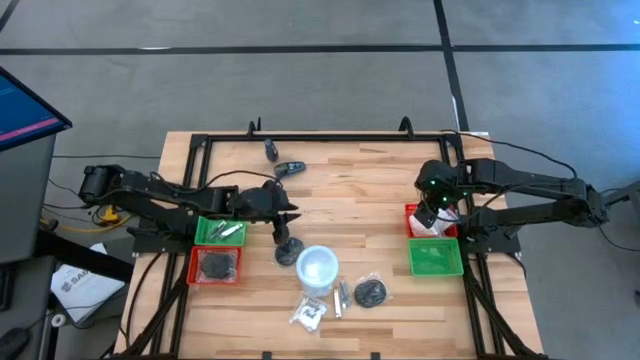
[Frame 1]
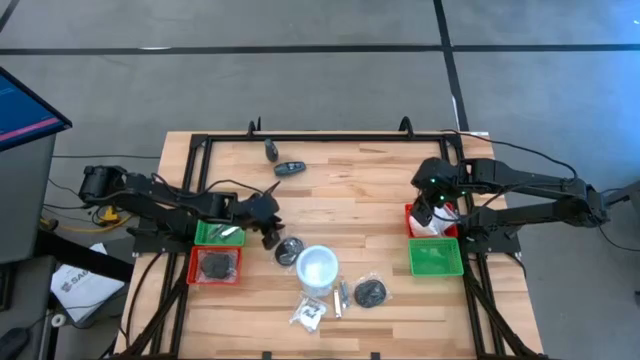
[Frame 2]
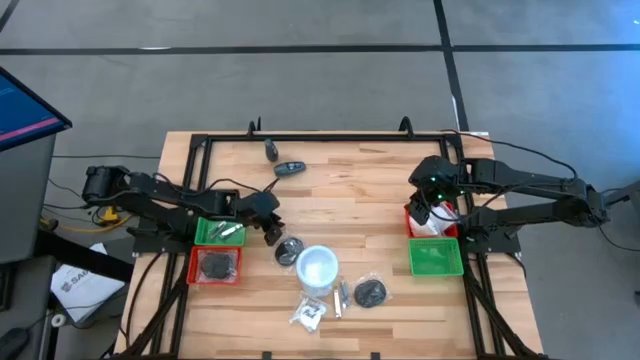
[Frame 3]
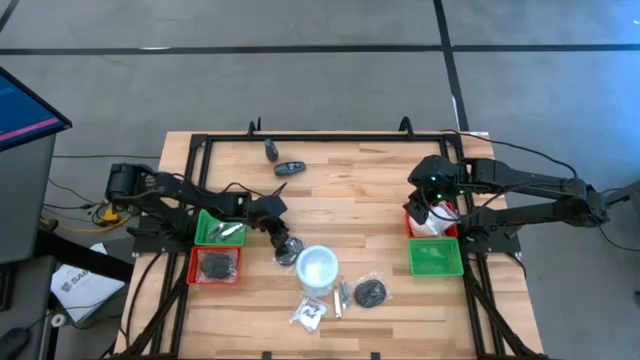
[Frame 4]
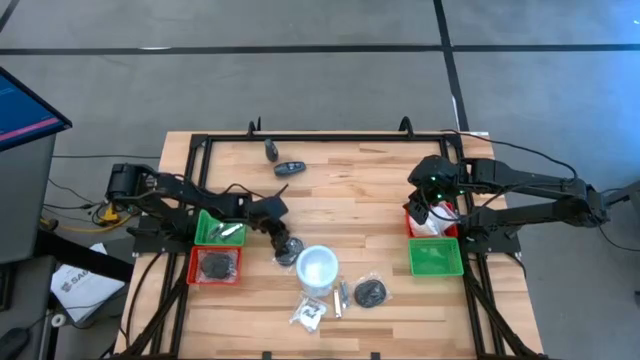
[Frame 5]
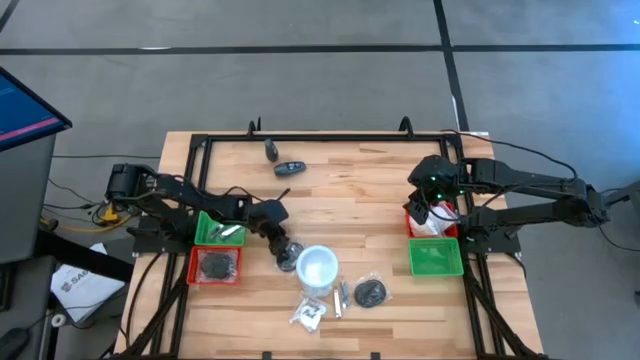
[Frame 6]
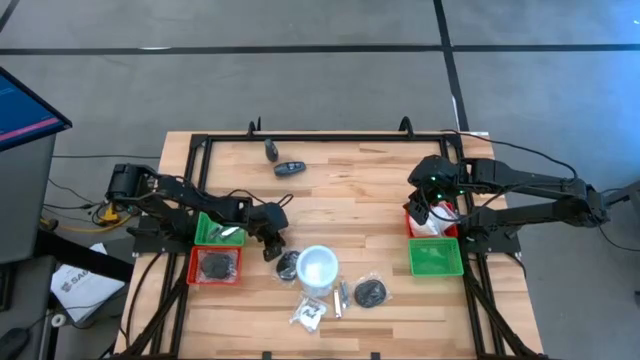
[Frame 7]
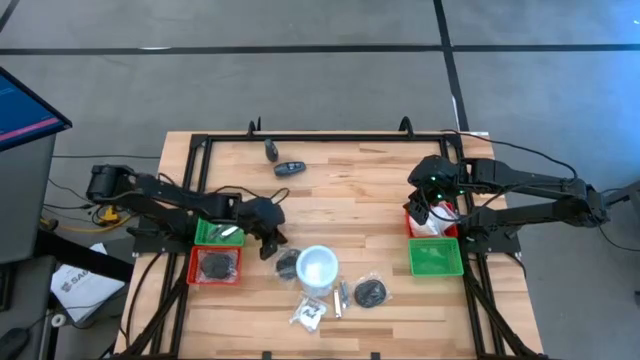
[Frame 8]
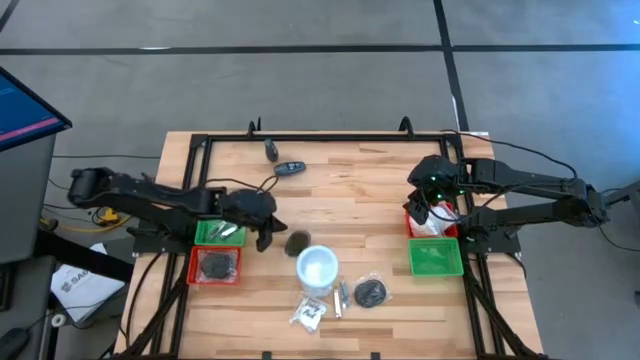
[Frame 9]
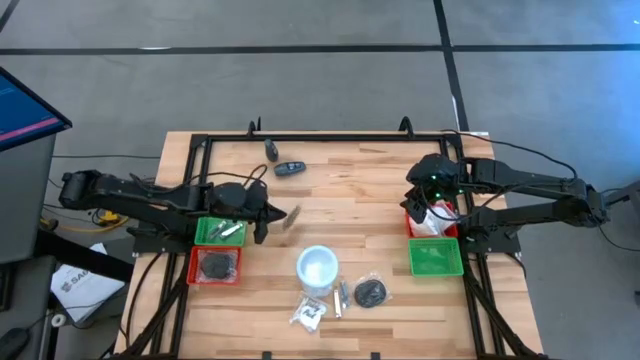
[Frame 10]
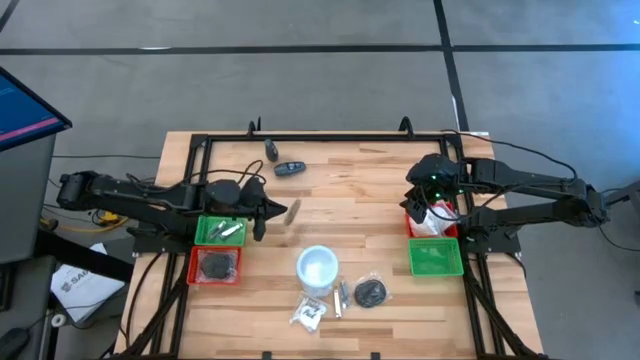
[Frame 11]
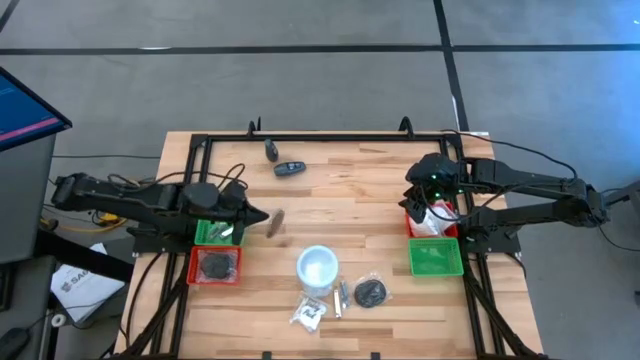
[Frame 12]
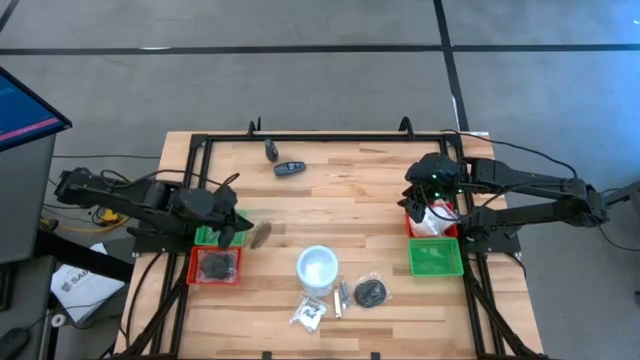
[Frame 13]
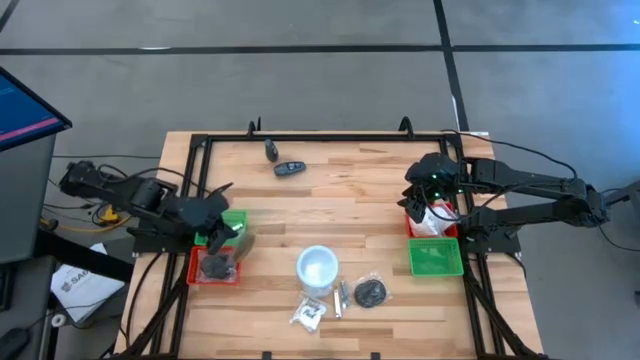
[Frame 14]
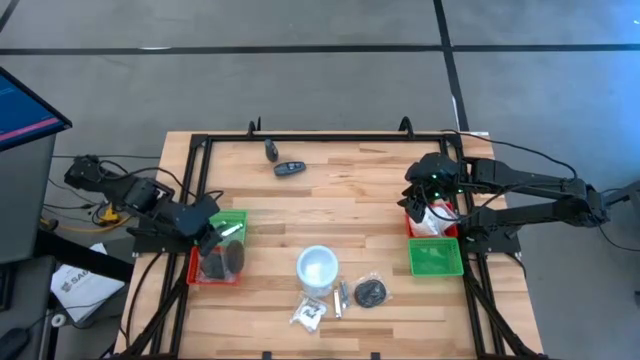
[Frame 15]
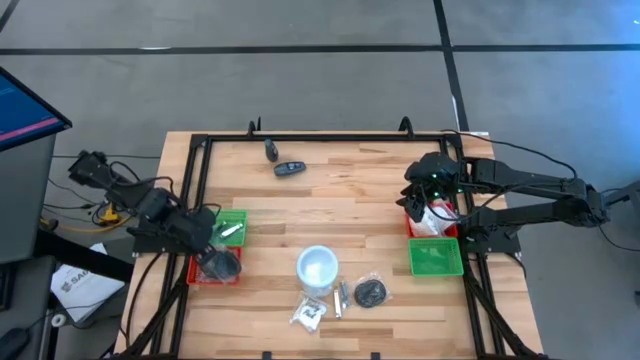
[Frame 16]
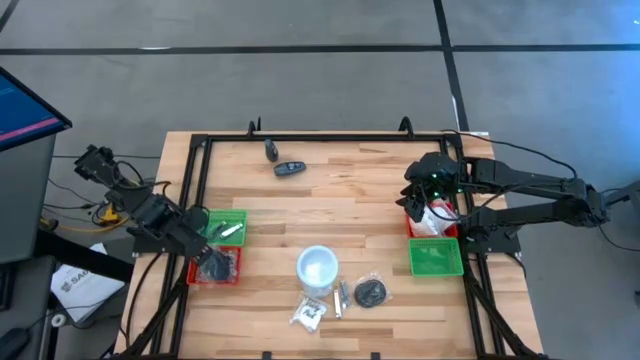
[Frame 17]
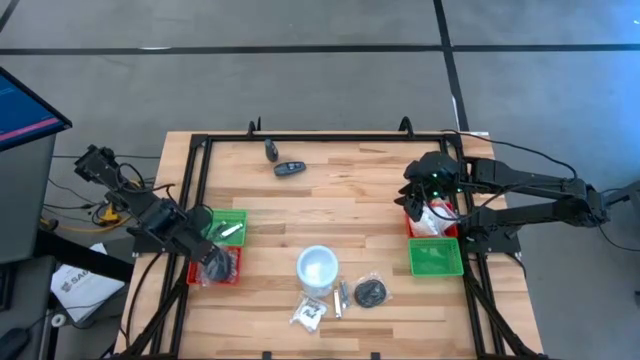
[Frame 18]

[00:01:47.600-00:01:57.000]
Task: Pick & Place Travel size toiletries
Put the black hairbrush into the left red bin

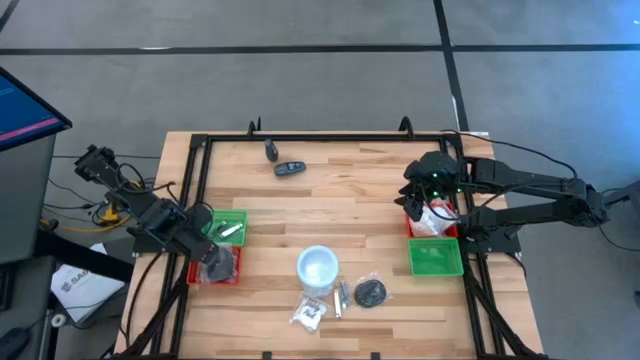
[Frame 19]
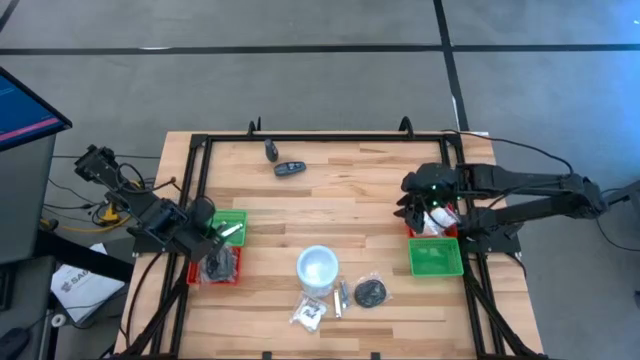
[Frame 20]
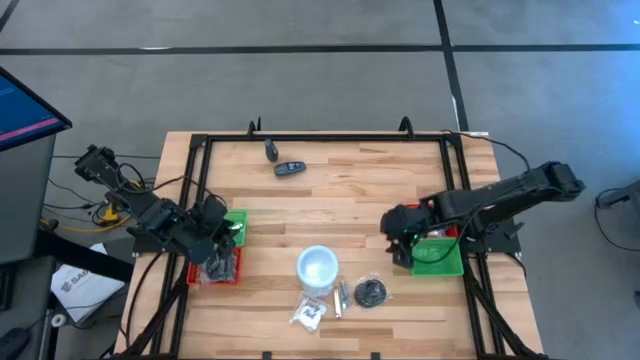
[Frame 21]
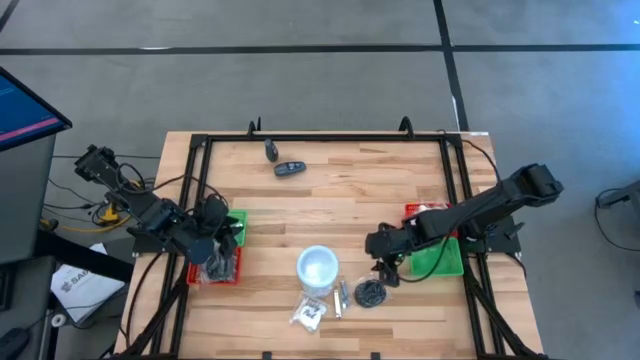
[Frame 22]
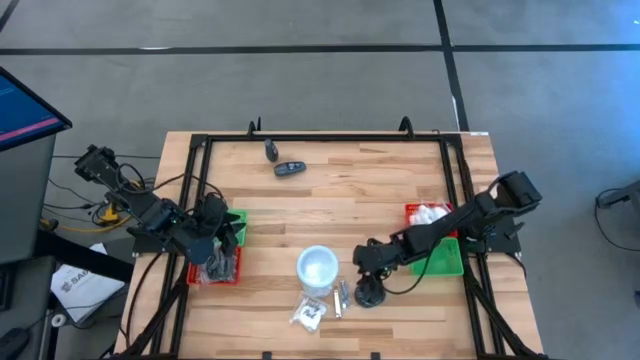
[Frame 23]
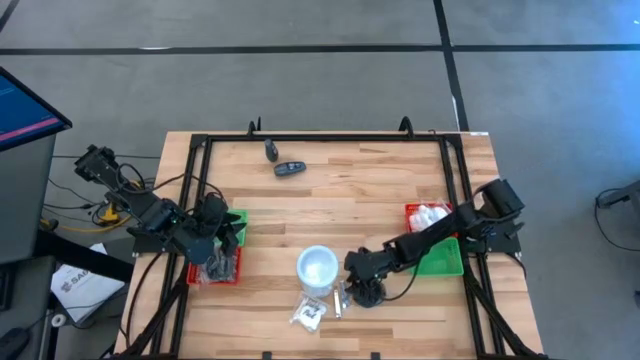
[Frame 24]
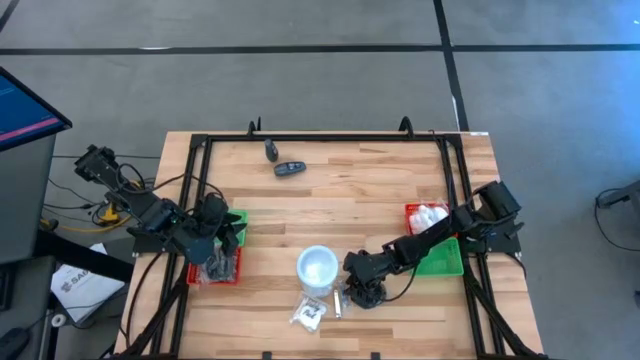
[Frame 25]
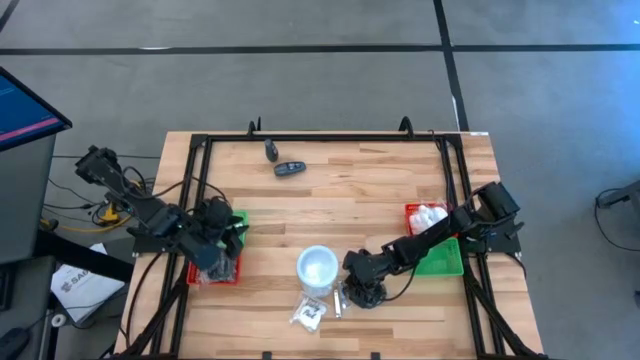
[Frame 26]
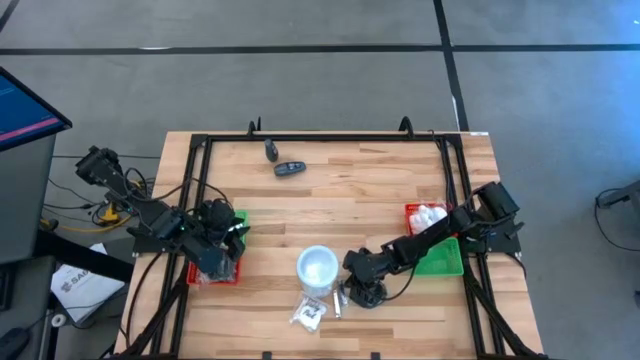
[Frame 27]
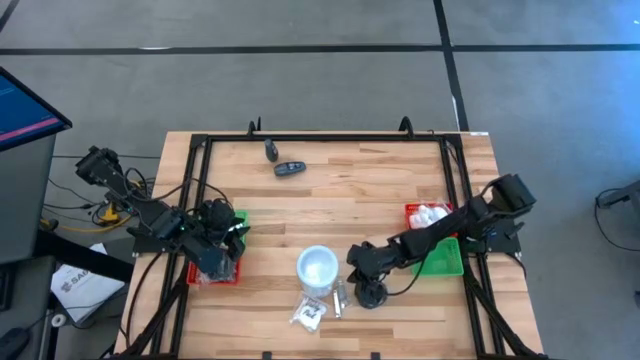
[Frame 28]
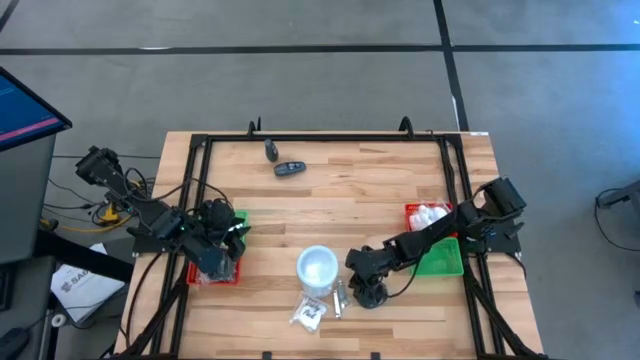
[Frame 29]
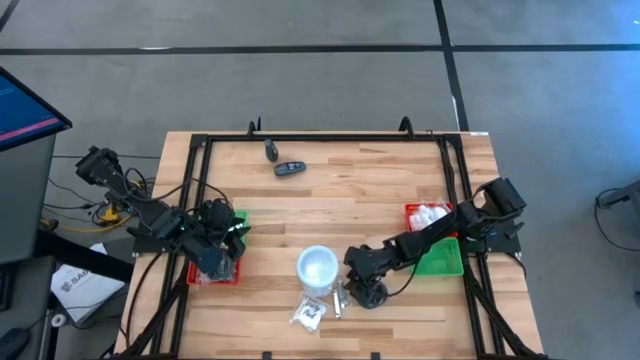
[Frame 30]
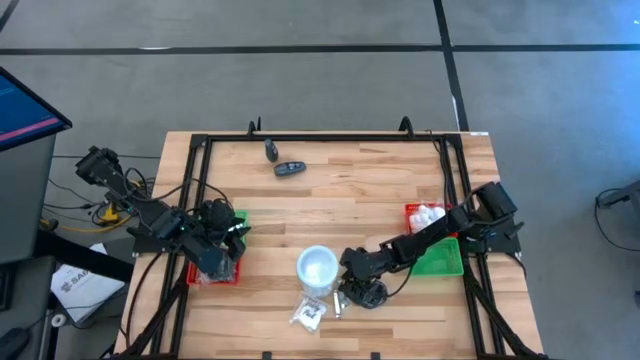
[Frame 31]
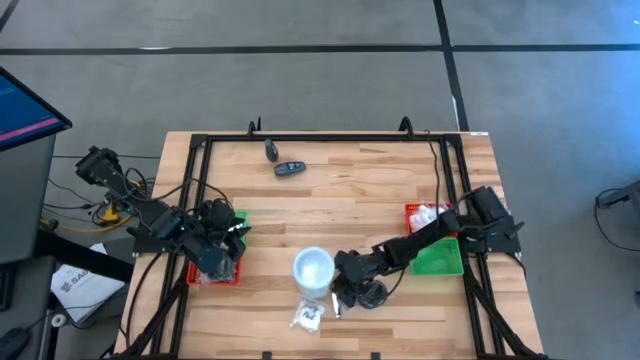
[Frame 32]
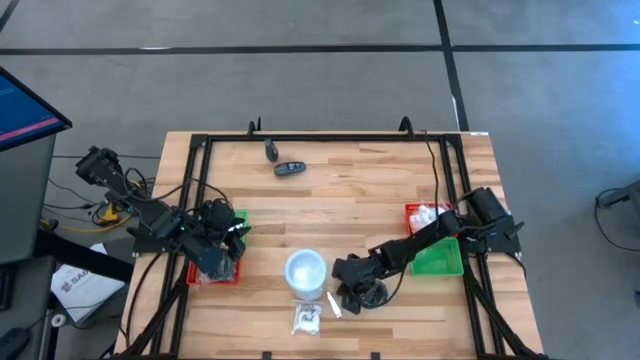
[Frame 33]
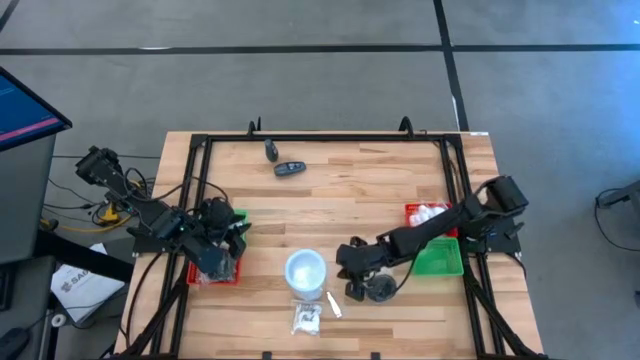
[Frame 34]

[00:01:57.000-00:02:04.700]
Put the silver nail cutter into the left green bin

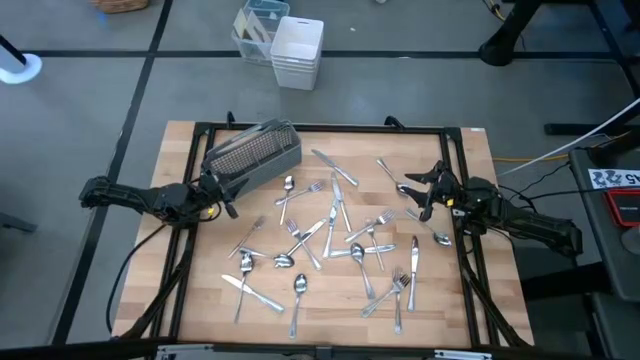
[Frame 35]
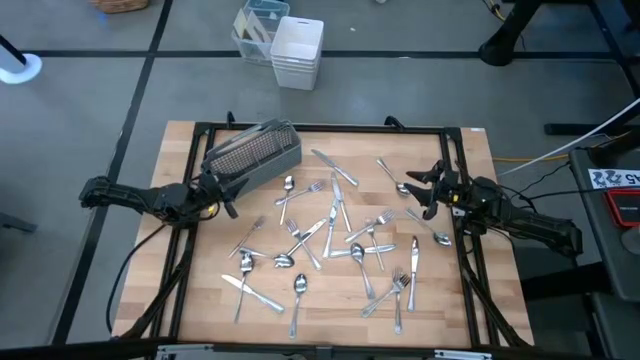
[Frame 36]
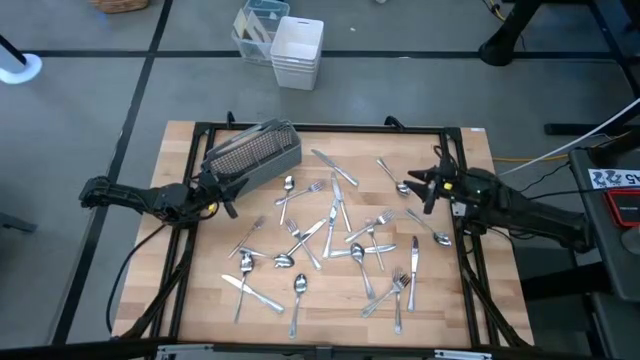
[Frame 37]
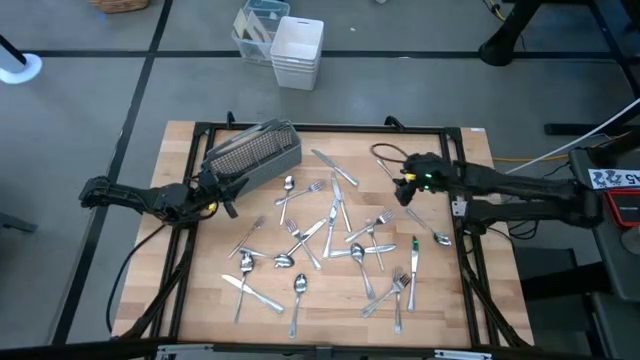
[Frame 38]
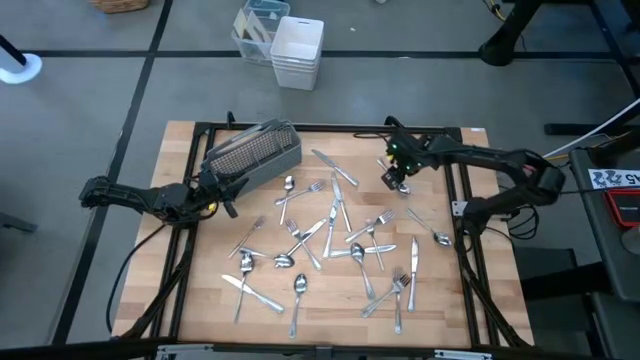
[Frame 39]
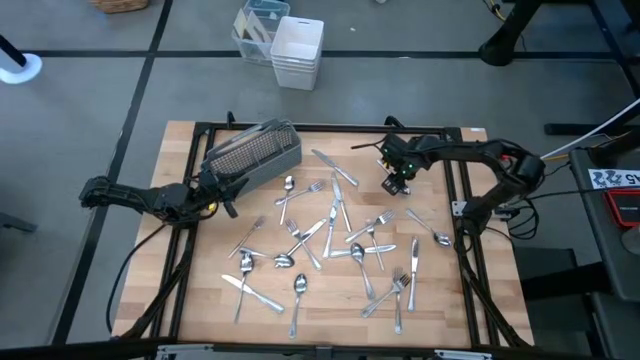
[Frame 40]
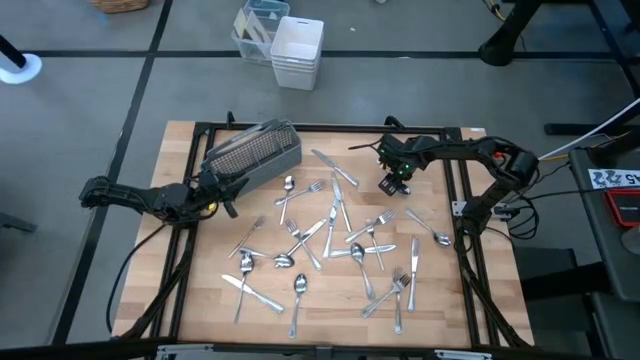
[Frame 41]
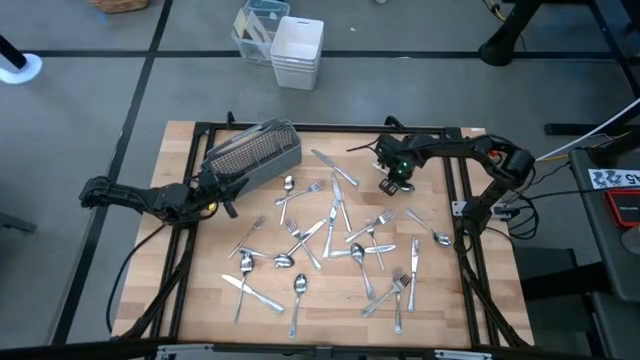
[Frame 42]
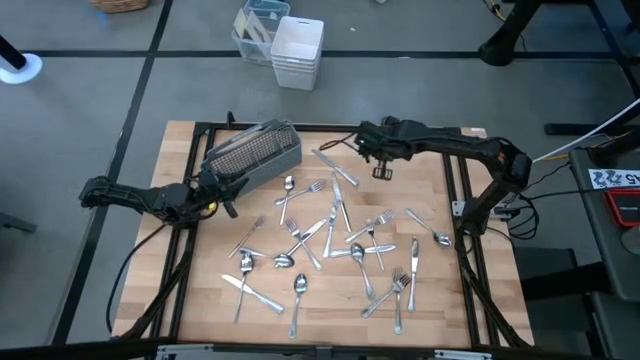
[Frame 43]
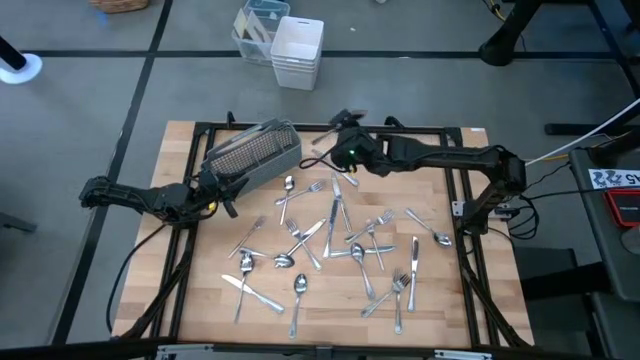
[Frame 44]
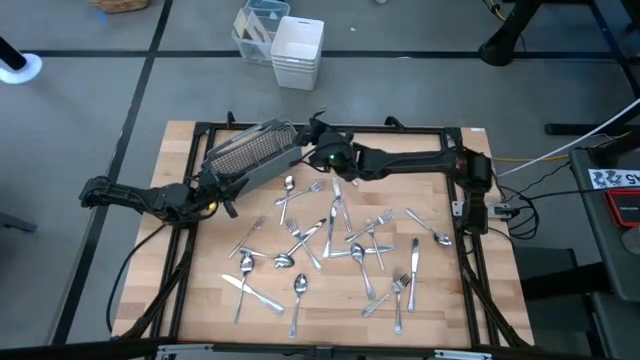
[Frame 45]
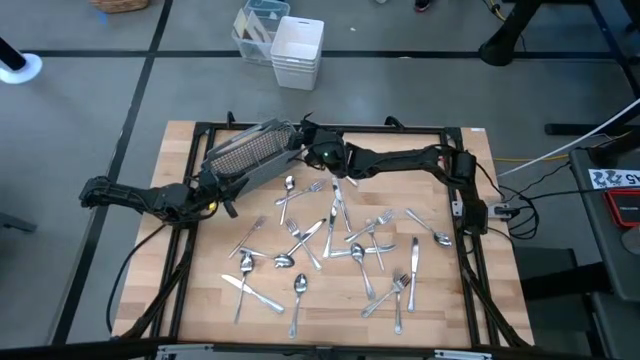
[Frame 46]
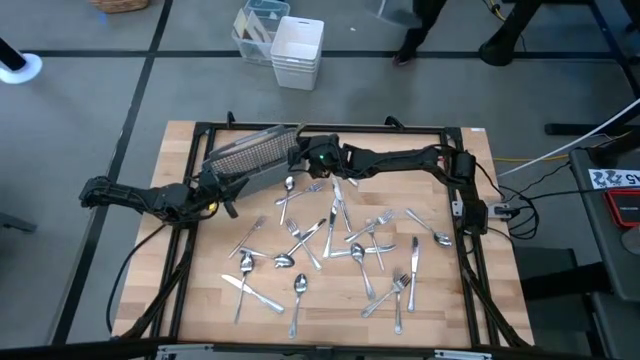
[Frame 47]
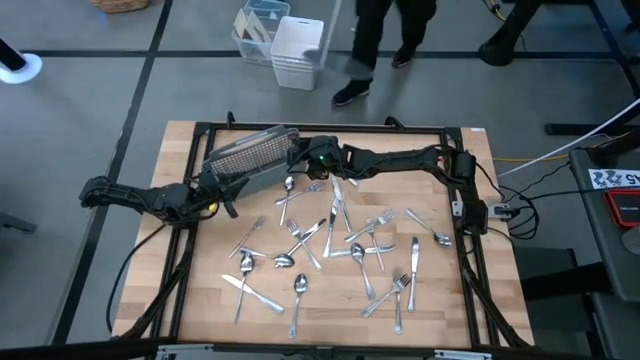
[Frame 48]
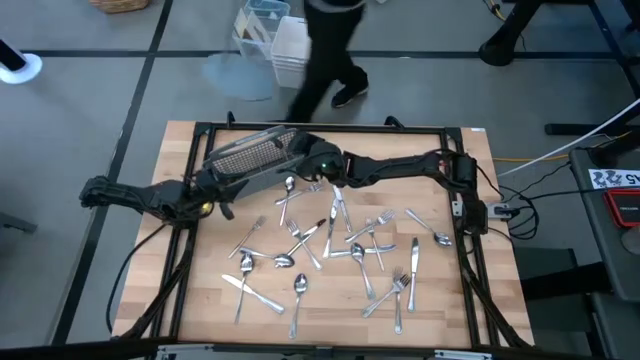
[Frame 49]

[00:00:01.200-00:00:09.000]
Task: Sort silverware
Put the silver spoon into the silverware rack
